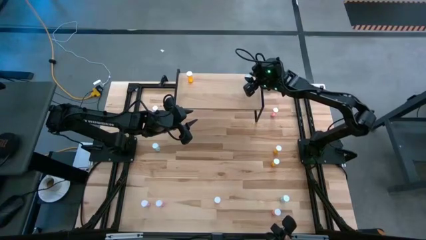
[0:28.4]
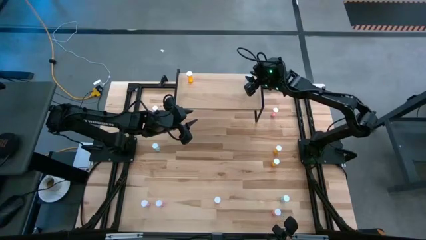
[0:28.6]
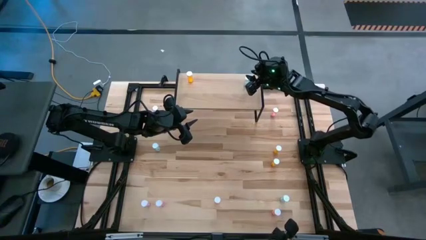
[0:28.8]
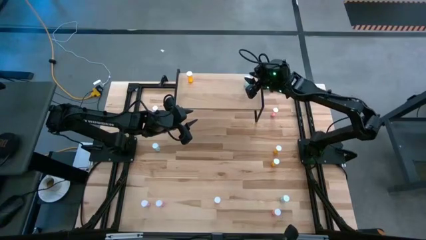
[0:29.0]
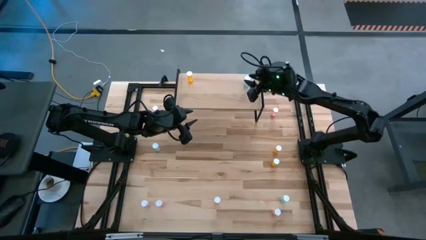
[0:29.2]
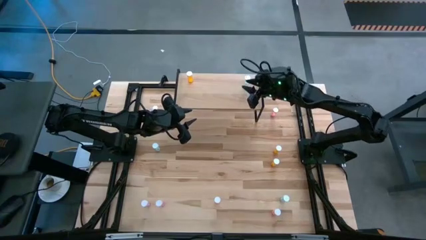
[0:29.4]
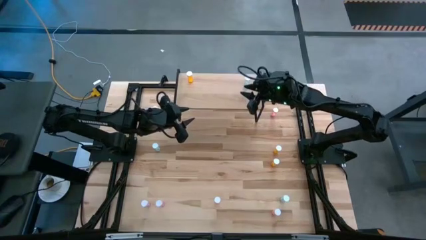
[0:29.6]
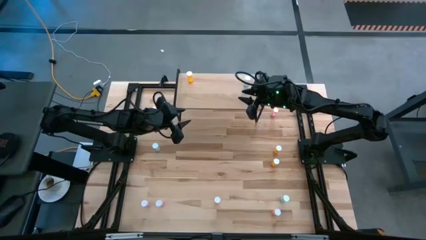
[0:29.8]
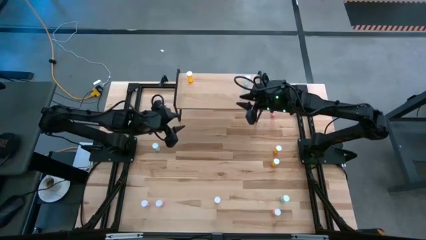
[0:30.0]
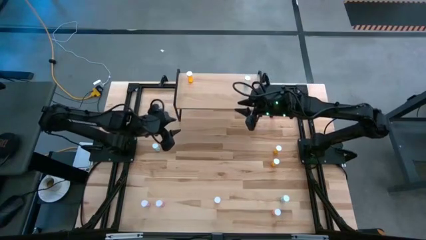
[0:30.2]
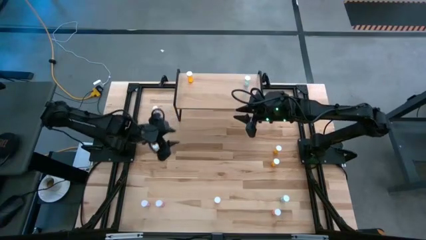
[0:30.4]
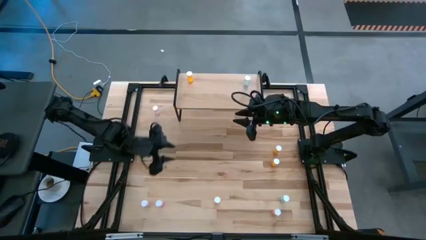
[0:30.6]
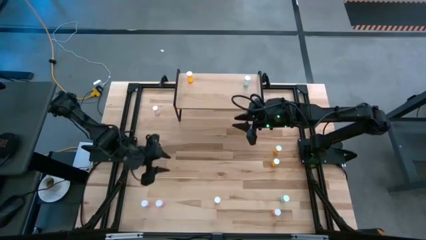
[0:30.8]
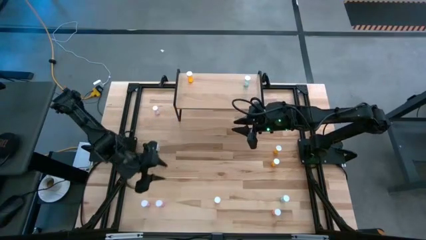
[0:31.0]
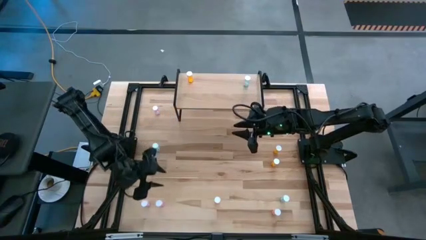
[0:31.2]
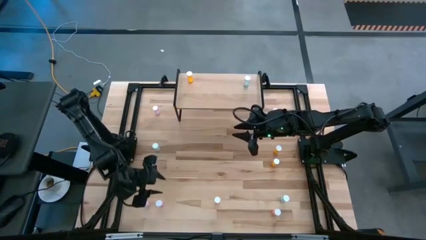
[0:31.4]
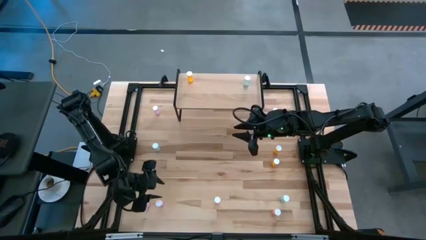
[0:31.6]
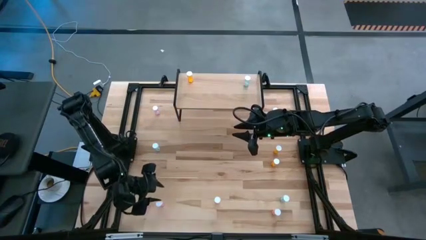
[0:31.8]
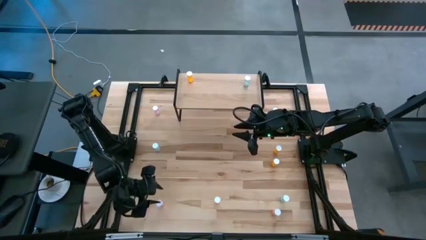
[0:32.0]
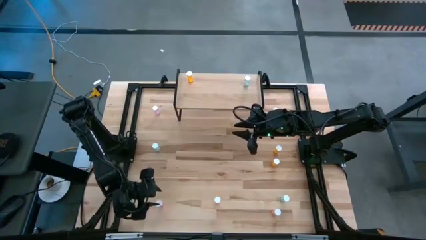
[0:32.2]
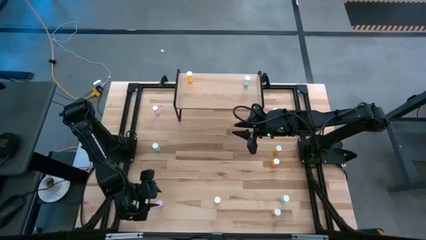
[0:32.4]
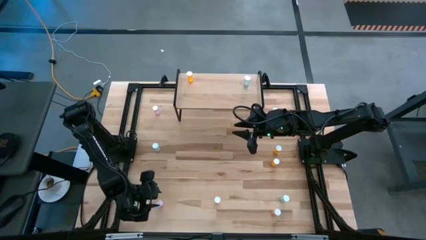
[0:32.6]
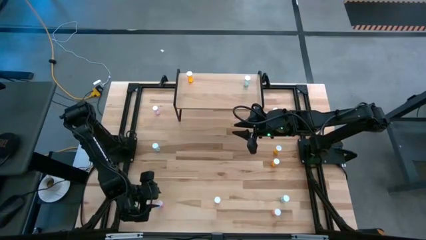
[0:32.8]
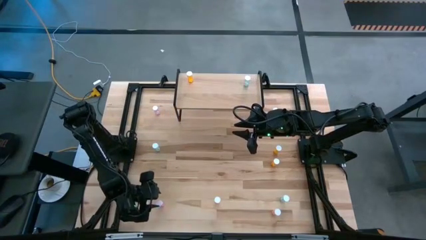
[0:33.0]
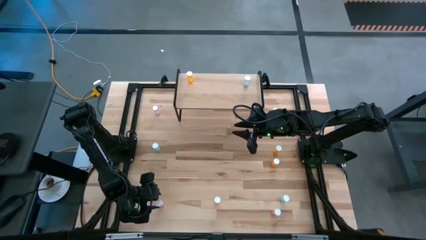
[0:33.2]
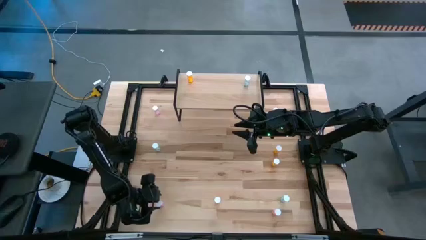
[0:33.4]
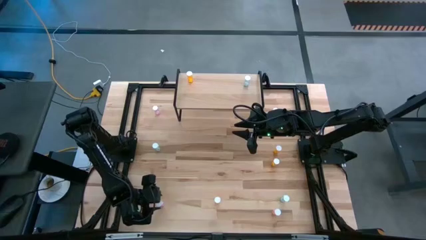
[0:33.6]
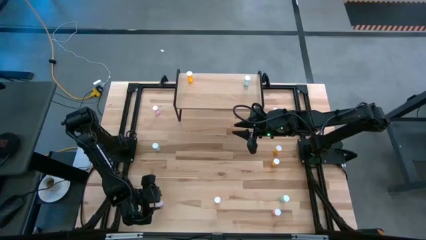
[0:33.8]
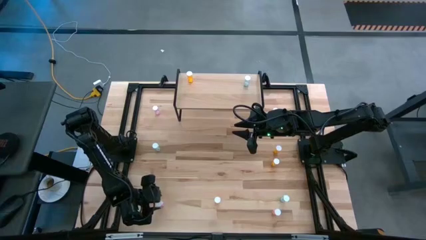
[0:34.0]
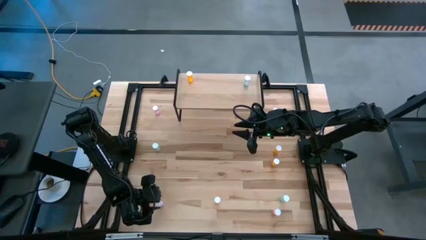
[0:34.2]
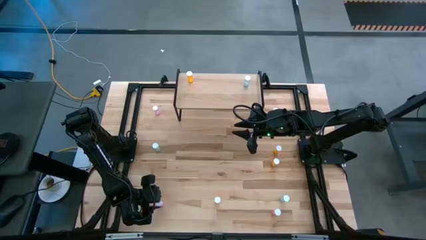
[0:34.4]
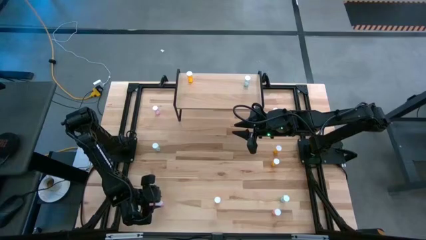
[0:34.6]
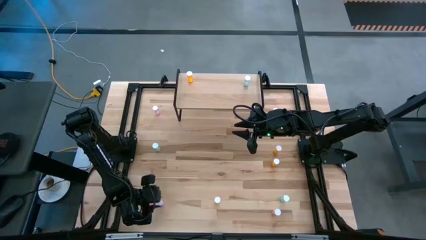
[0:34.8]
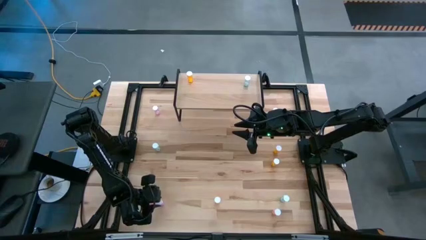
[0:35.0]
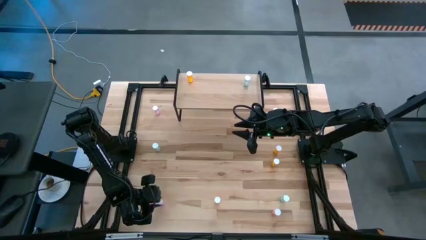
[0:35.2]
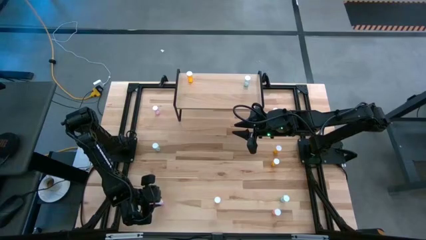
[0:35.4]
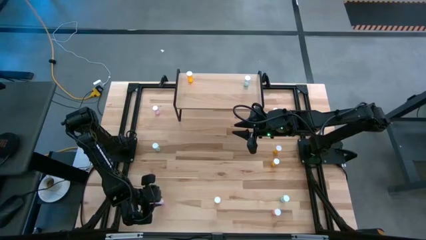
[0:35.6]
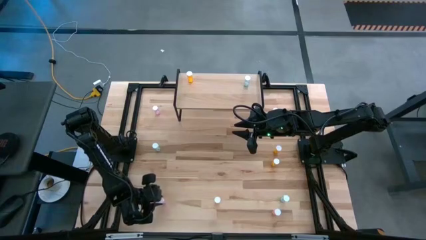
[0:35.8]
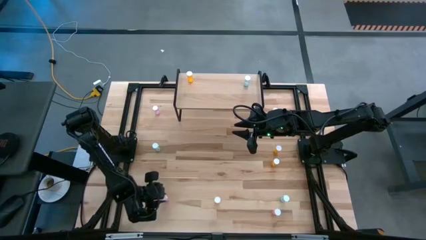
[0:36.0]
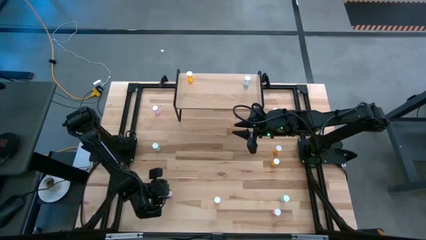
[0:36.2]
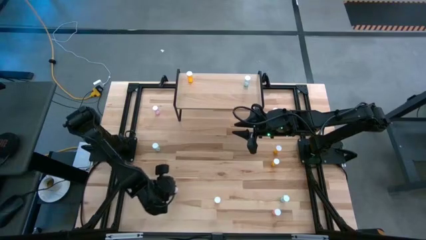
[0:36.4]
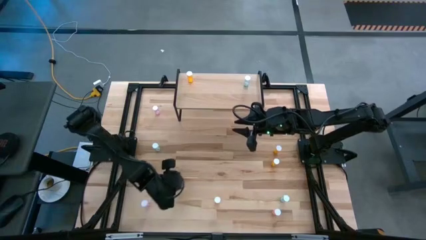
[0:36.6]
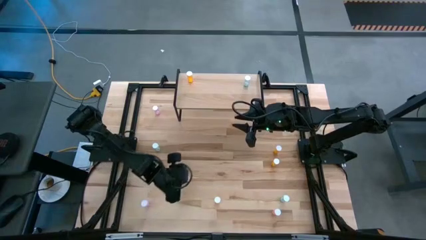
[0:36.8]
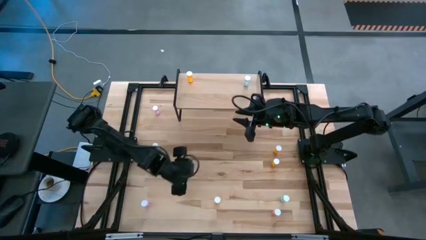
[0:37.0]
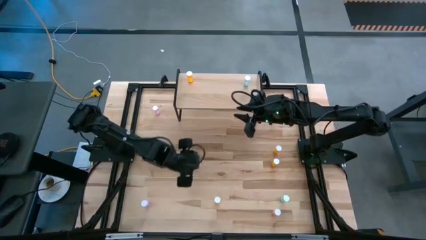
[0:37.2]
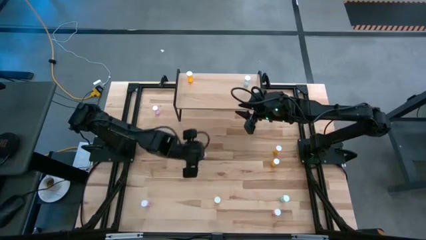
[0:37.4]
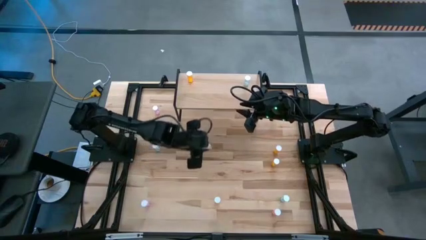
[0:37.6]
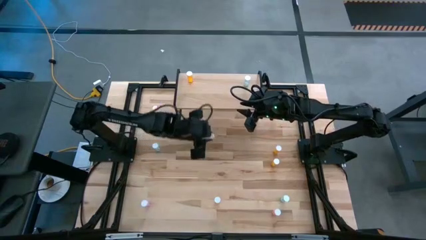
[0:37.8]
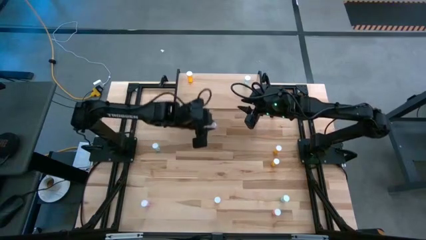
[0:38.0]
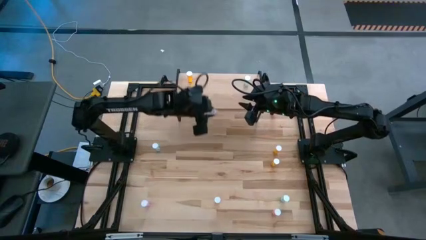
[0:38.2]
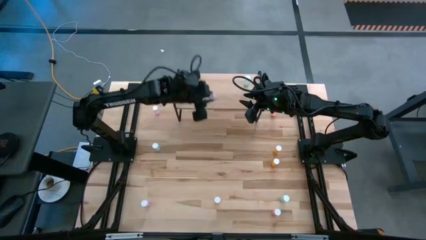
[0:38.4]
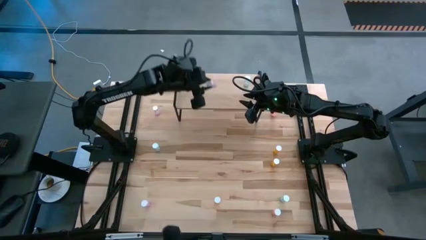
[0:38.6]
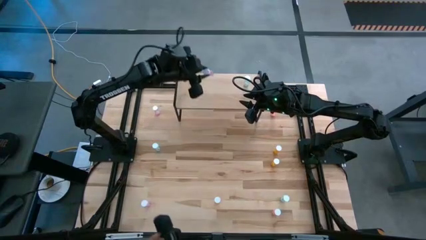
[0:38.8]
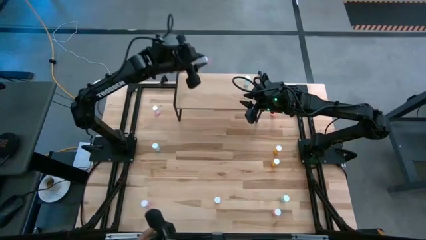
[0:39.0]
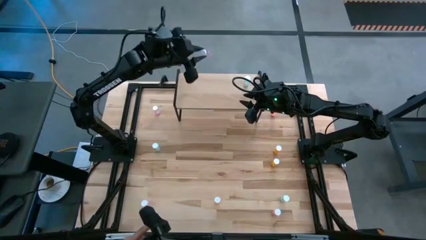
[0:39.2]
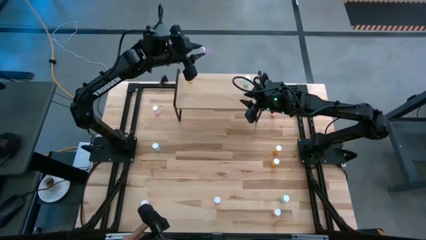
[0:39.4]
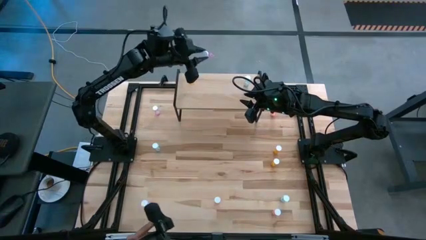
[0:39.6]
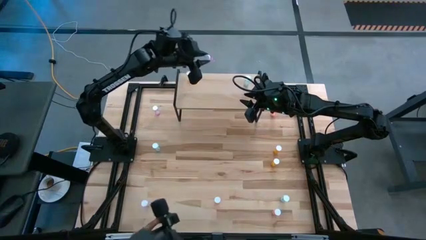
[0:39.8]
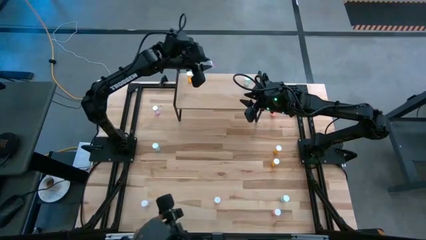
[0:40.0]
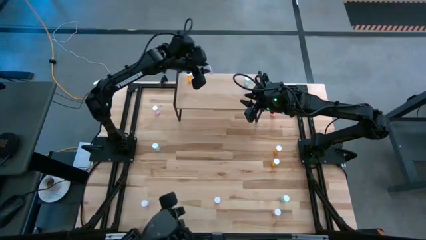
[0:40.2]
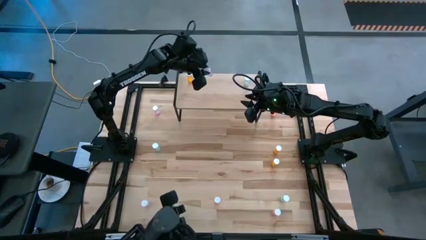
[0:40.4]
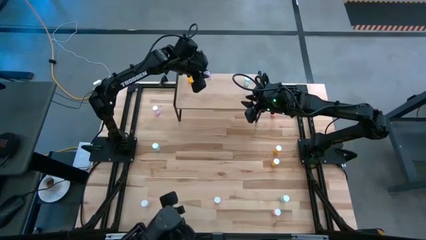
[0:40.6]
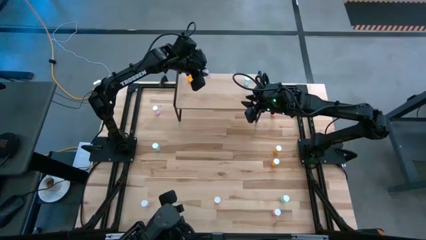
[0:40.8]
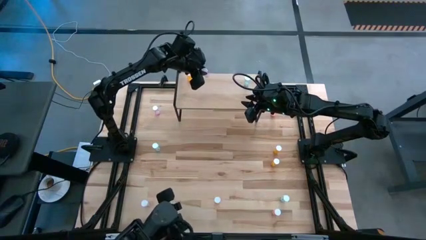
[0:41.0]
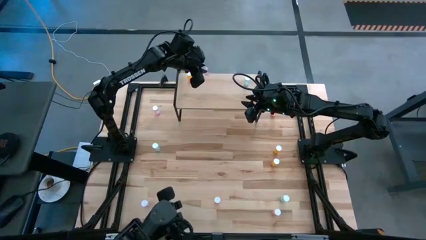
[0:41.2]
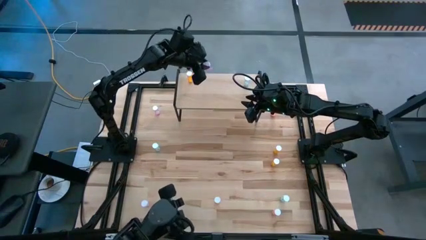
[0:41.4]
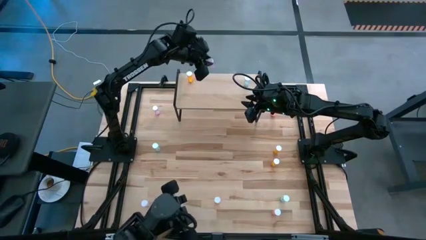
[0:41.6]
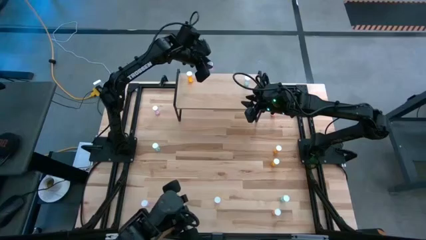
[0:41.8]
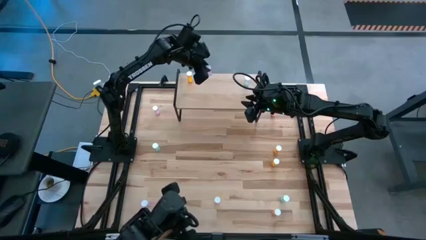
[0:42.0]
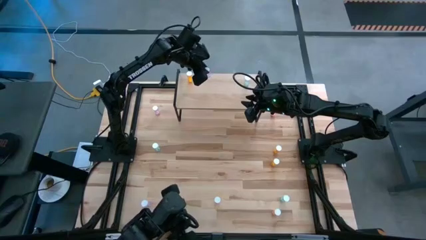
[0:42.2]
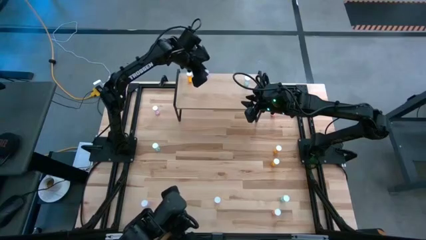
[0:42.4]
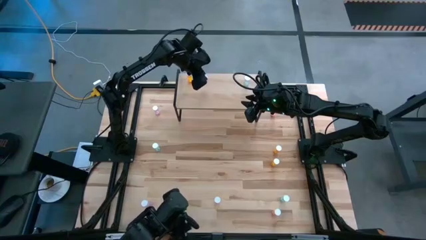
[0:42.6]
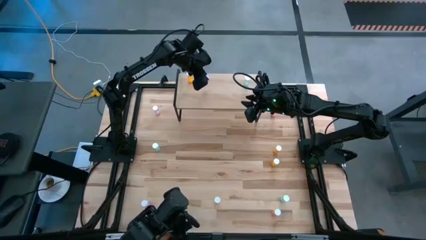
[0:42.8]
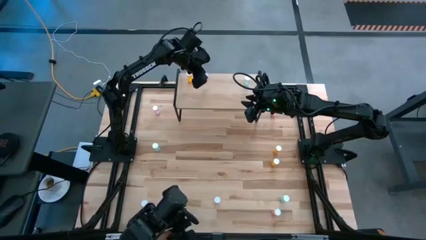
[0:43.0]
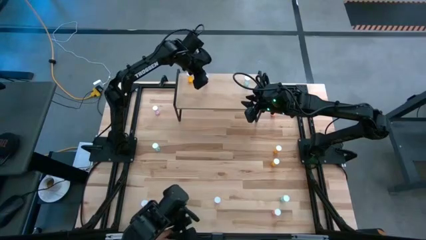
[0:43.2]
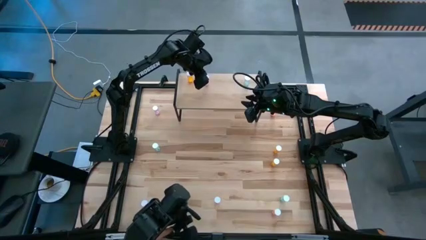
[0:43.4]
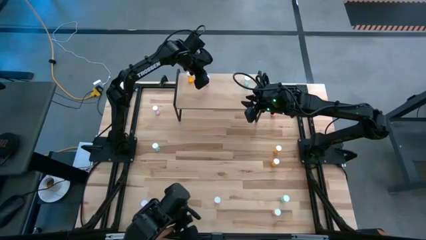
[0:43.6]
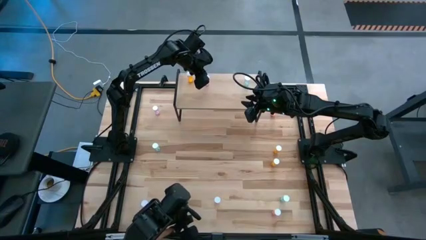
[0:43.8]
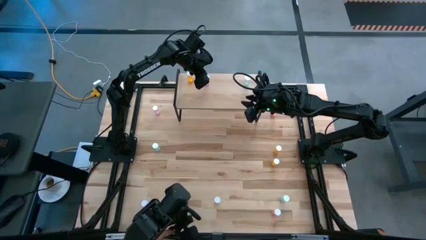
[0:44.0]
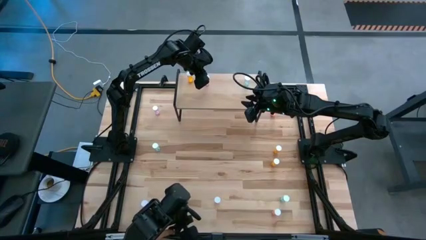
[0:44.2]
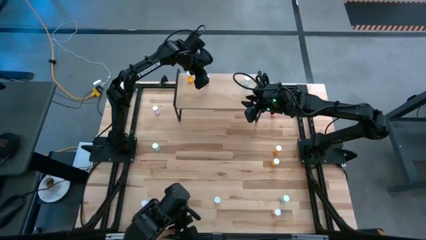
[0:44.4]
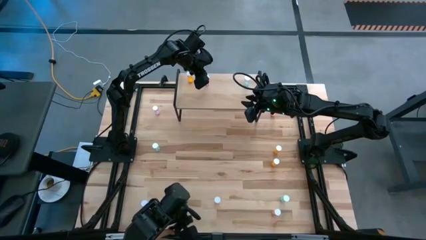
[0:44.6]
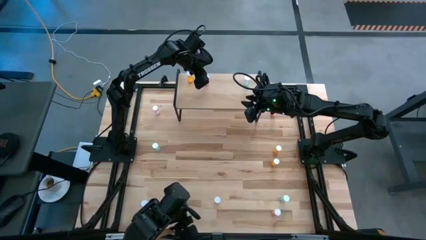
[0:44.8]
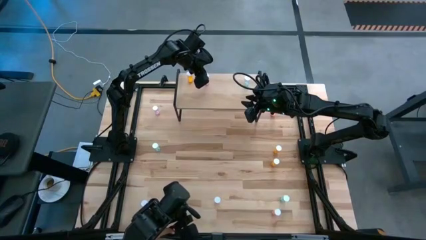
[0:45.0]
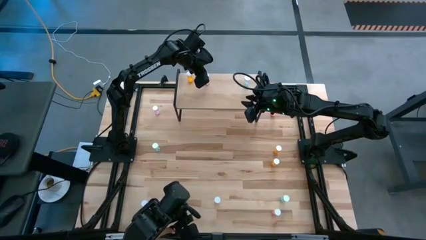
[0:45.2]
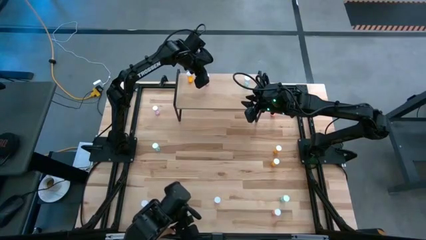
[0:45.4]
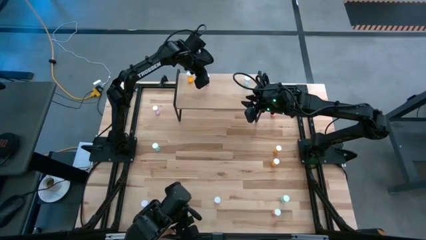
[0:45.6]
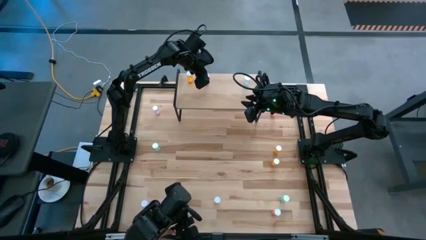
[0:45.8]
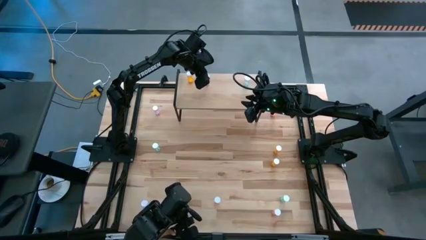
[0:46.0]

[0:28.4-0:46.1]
Task: Pick and place medicine bottles onto shelf by color
Put the bottom right purple pill bottle on the shelf
